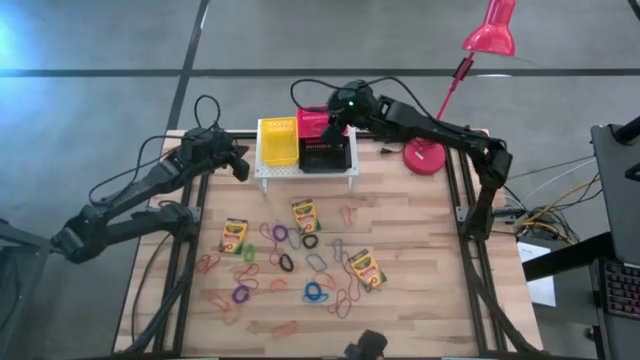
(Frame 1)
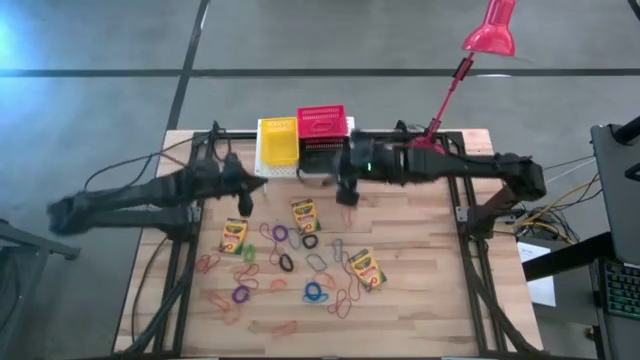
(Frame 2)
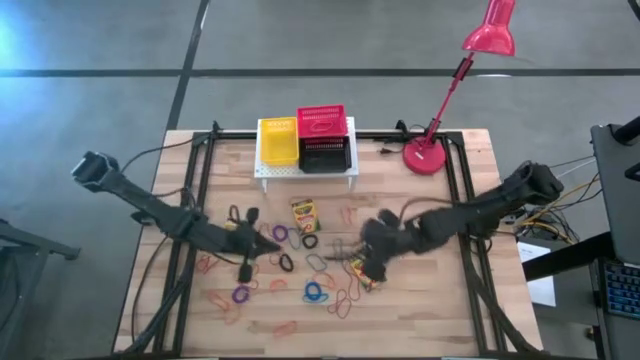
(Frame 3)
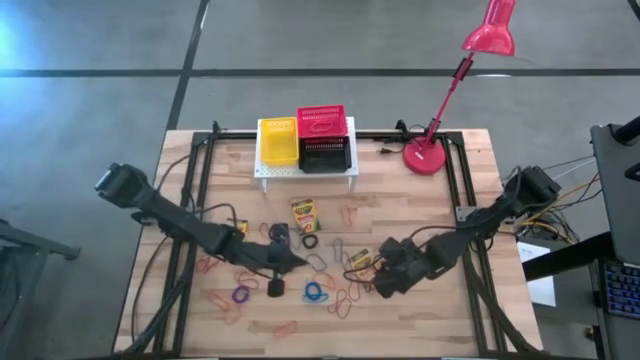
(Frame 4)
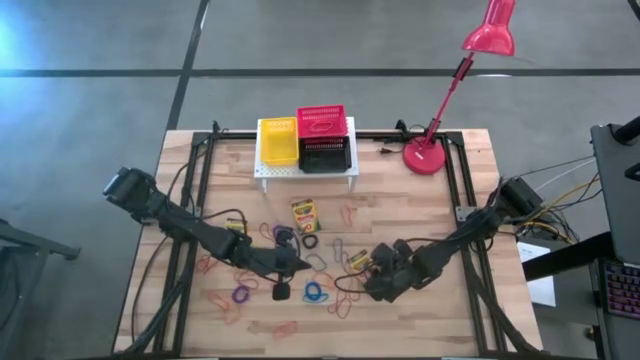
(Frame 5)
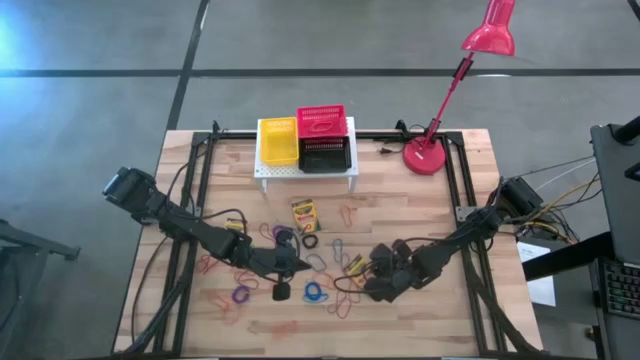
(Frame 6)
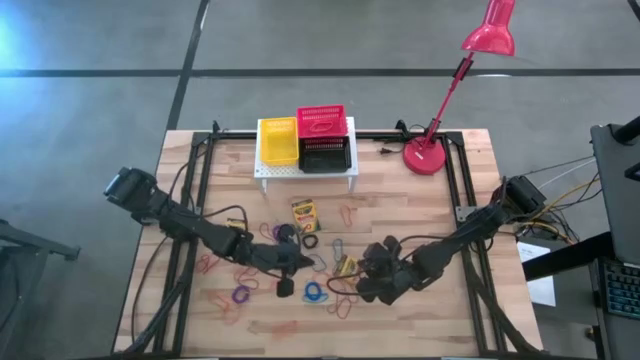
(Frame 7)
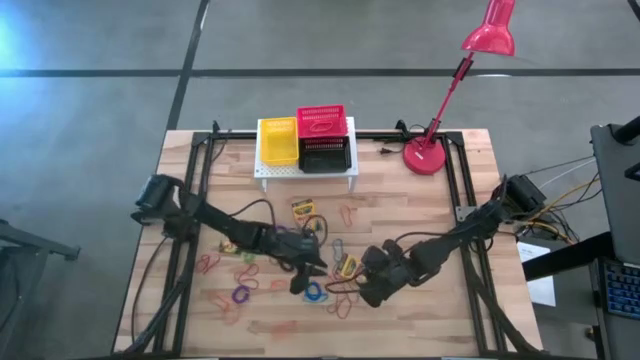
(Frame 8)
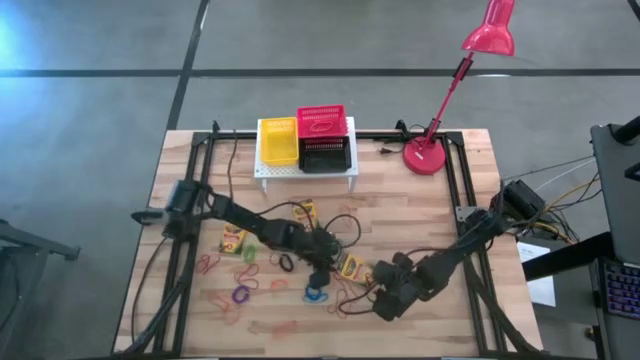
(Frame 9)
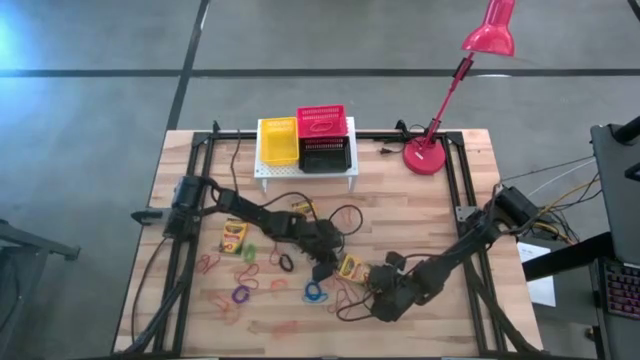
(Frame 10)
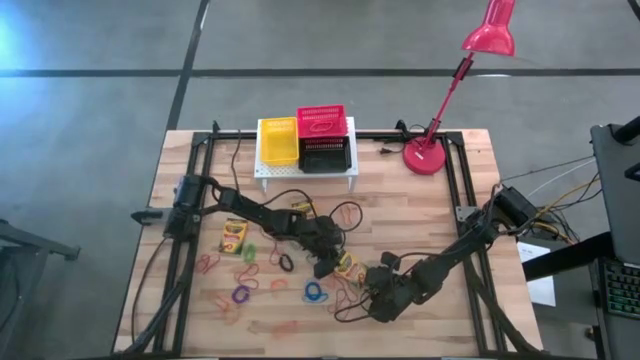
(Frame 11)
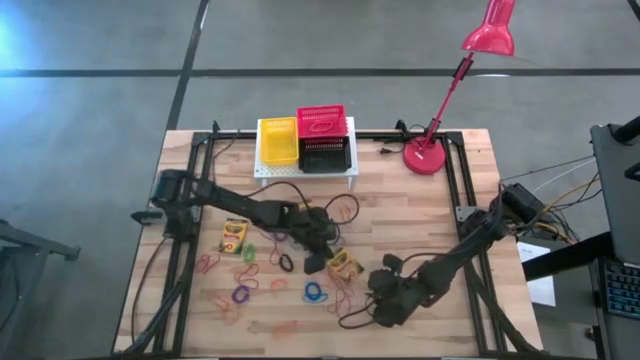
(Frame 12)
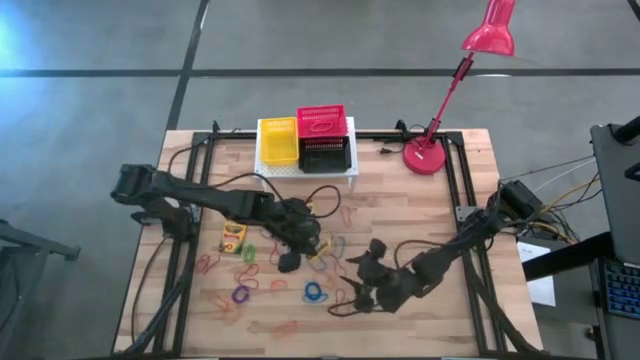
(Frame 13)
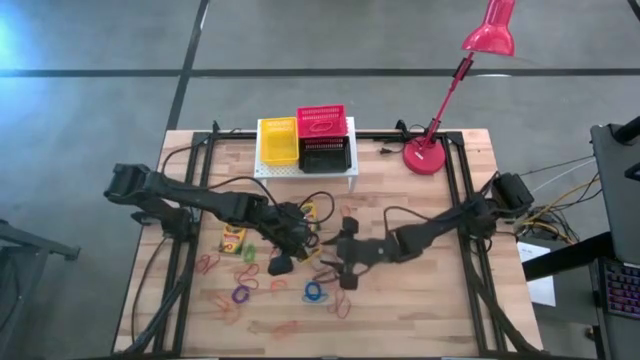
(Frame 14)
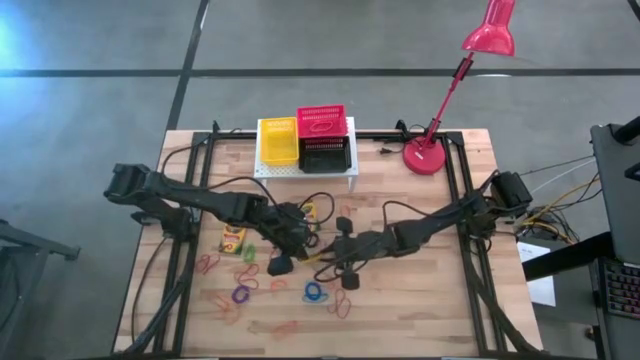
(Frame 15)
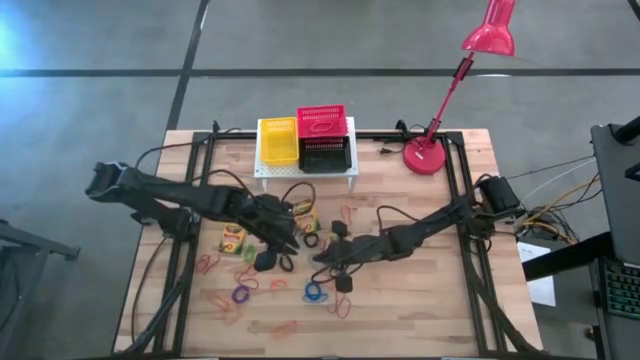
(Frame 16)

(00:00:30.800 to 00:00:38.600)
Task: Pick & Place Office Desk Supplies
Put the crayon box into the black bin

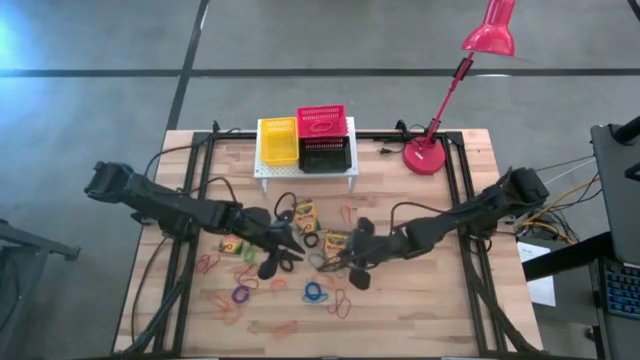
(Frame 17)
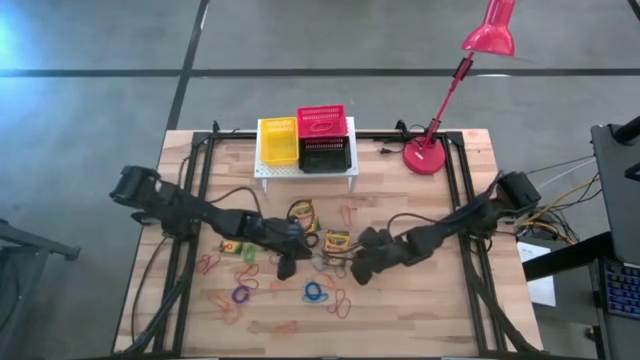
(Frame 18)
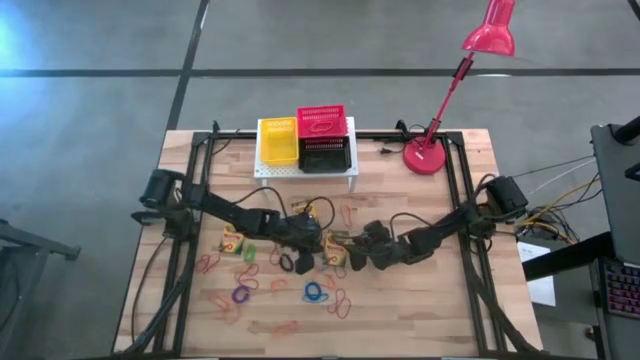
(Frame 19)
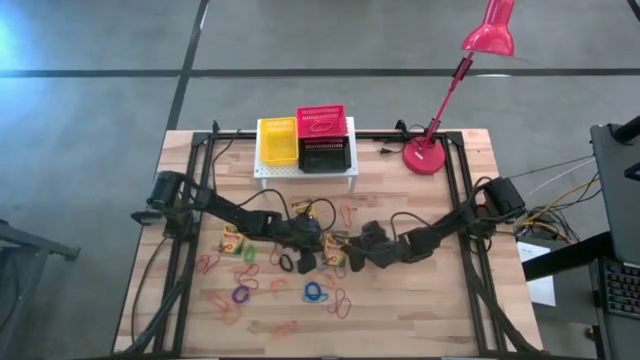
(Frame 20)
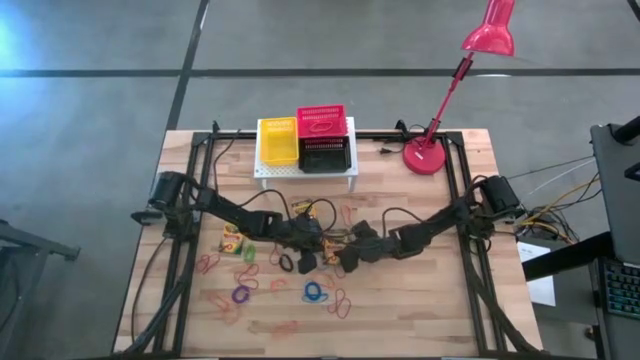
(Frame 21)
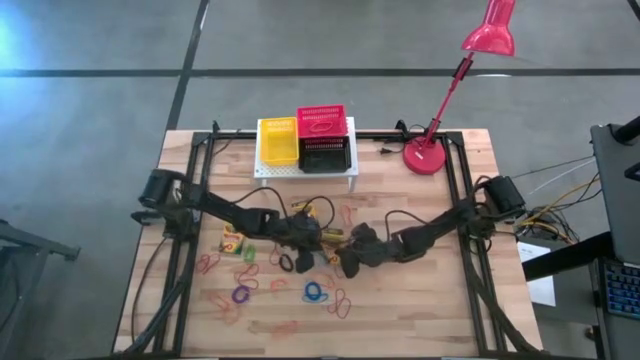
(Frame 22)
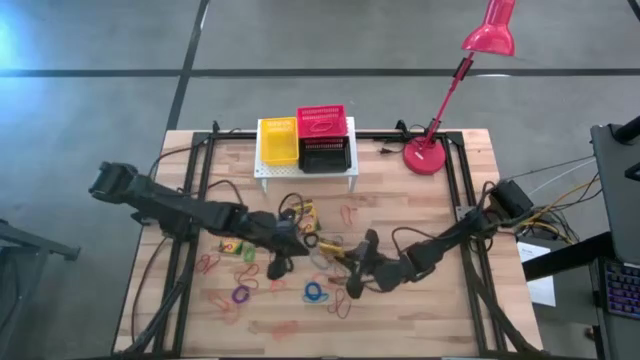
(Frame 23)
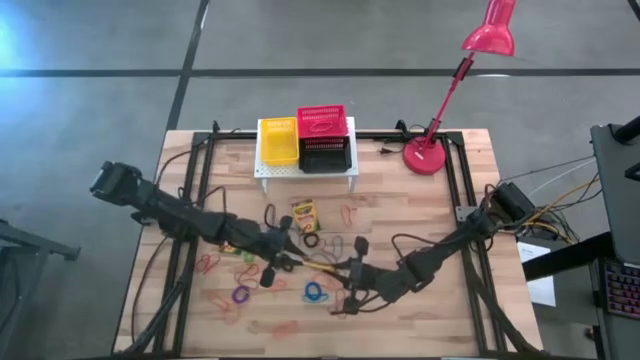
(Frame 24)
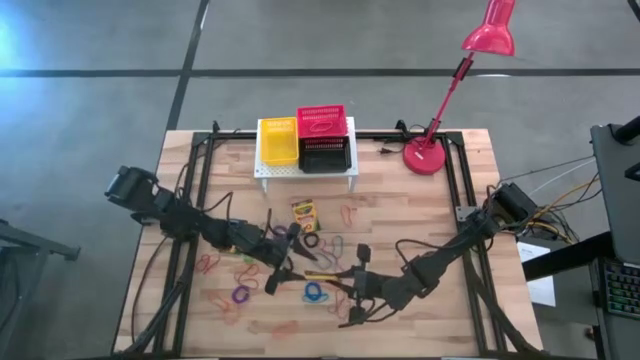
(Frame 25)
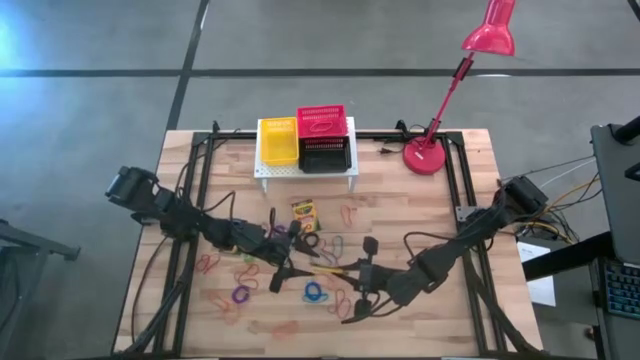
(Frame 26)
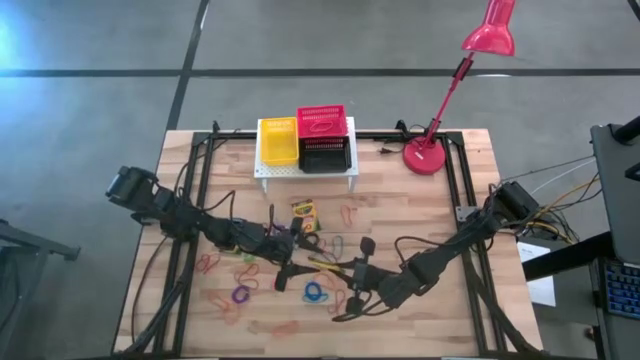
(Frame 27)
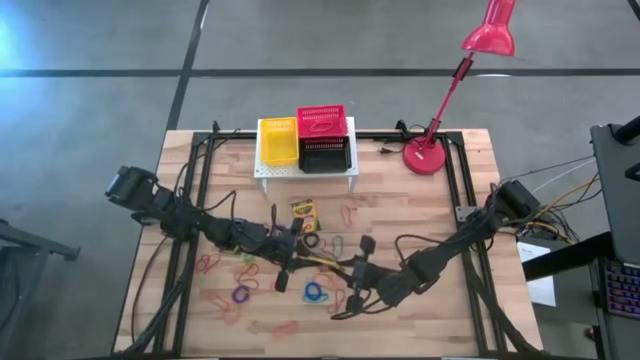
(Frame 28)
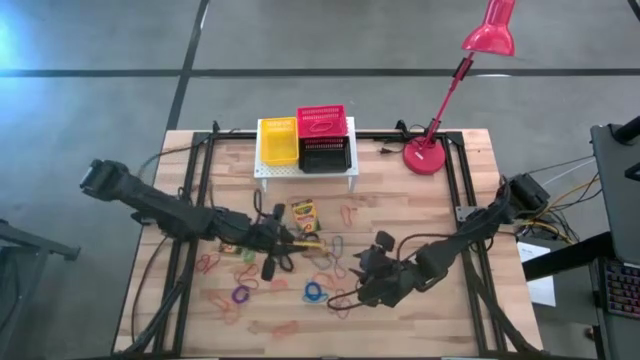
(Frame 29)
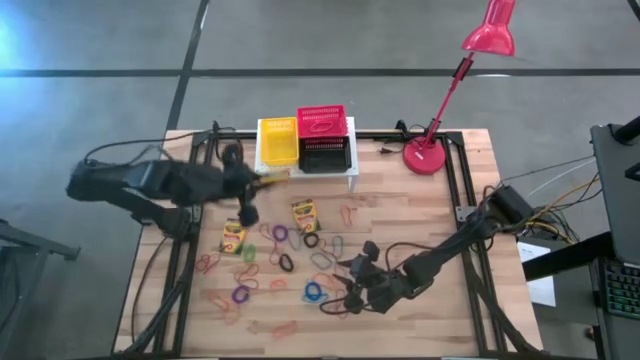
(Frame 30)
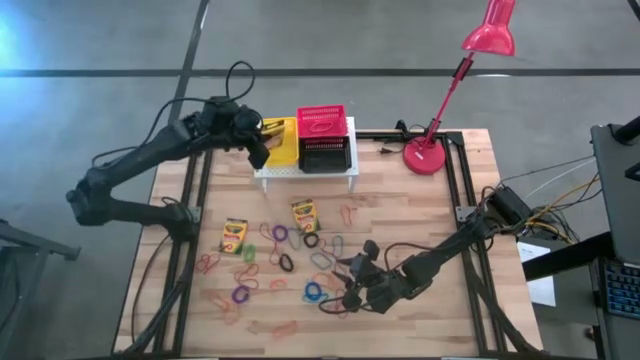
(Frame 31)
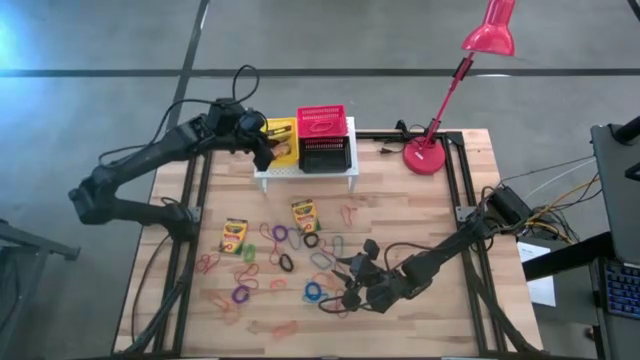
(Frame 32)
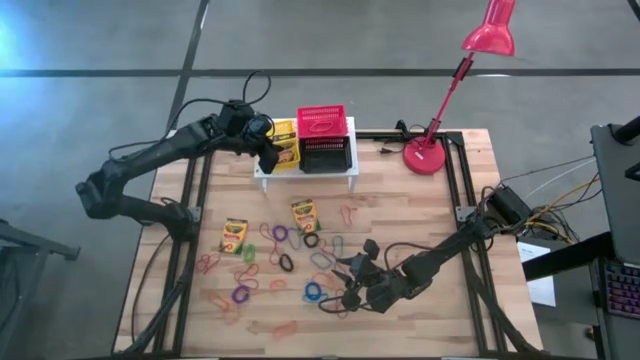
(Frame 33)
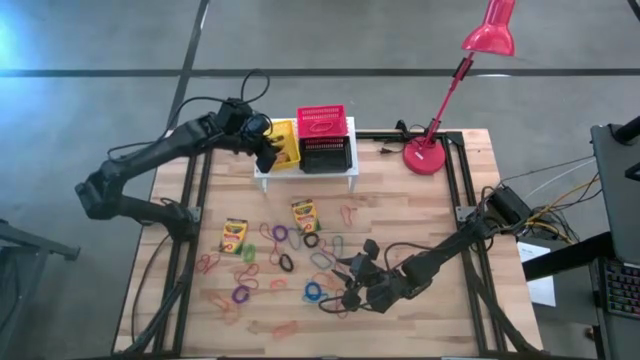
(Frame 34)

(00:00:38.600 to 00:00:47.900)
Put the crayon box into the yellow bin

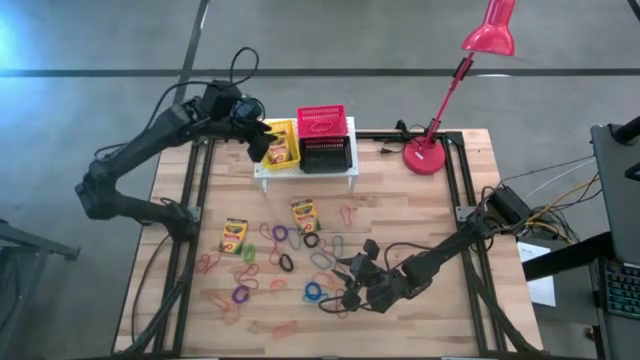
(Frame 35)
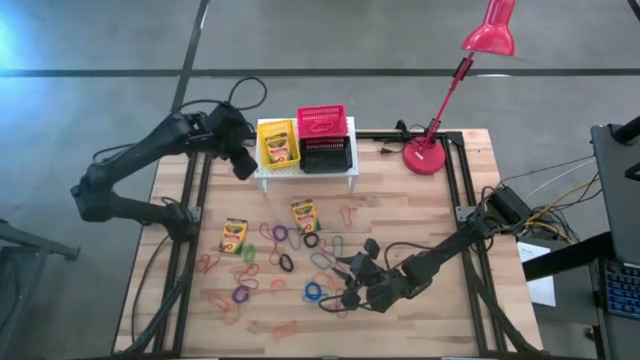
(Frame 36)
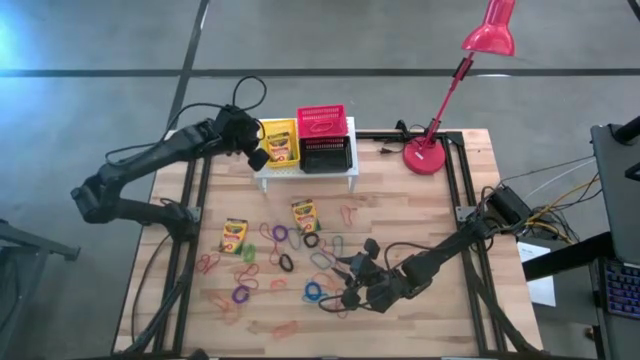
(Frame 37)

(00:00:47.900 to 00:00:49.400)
Adjust the yellow bin

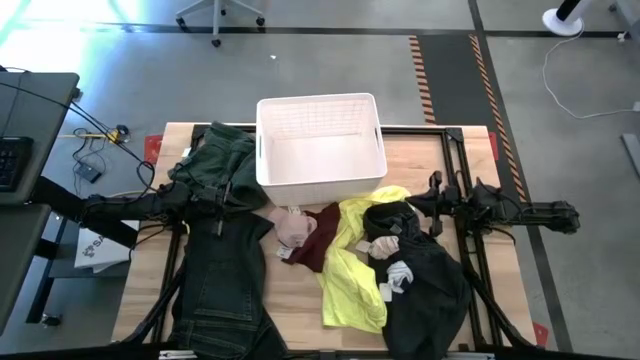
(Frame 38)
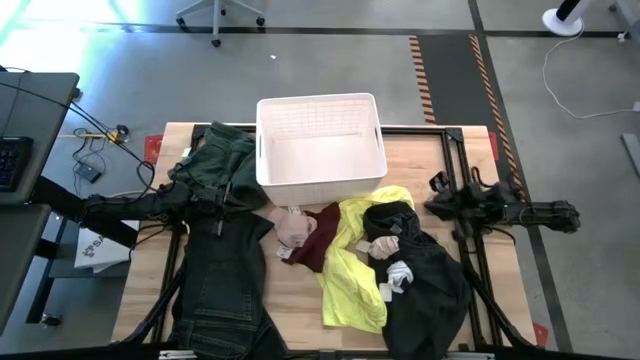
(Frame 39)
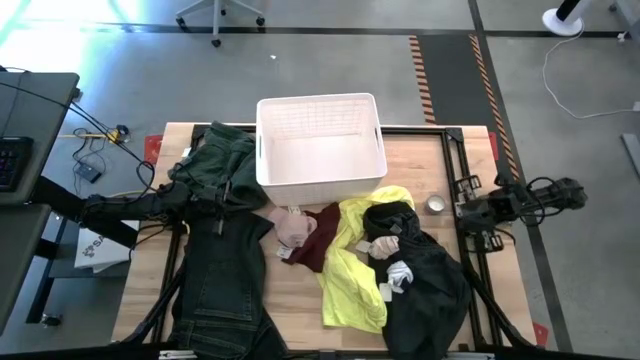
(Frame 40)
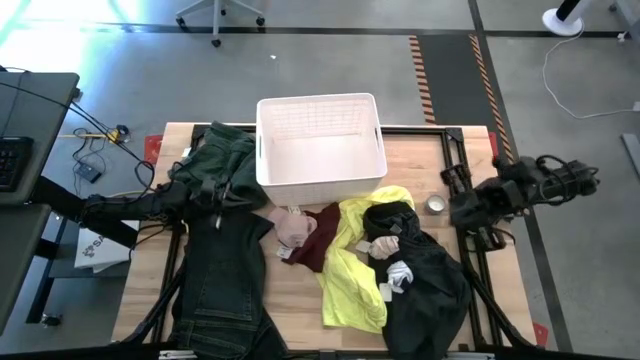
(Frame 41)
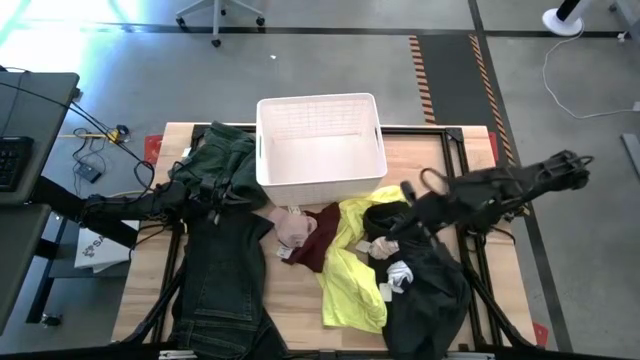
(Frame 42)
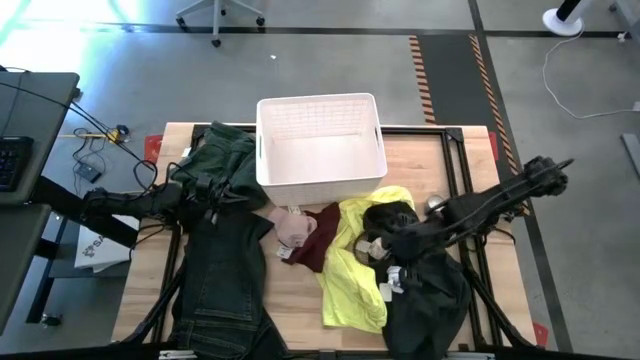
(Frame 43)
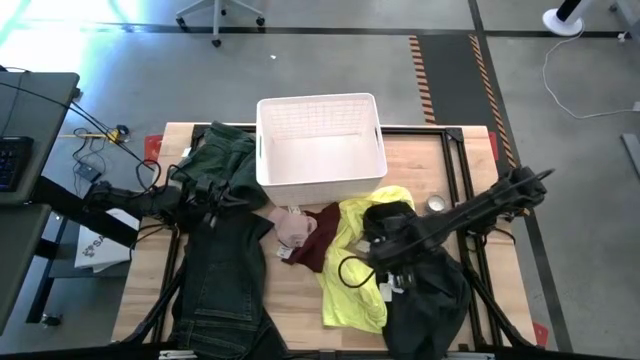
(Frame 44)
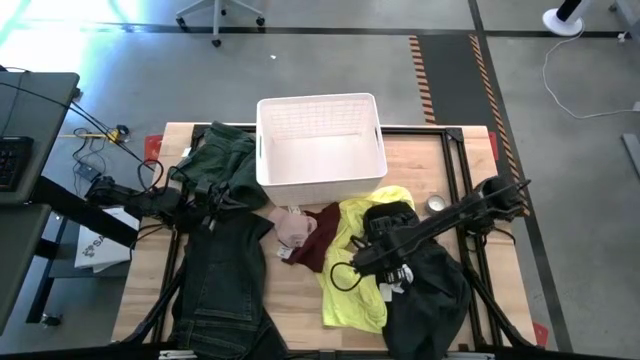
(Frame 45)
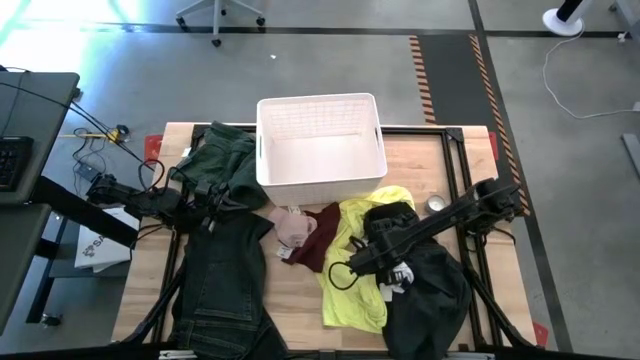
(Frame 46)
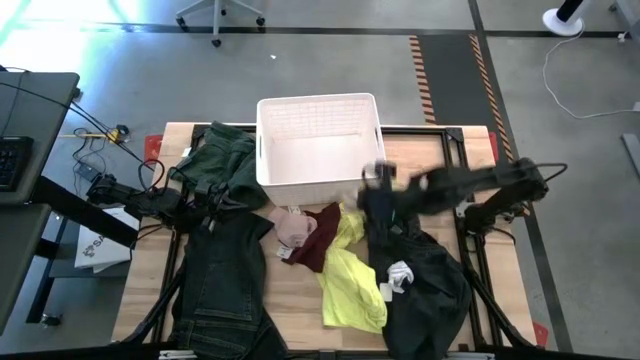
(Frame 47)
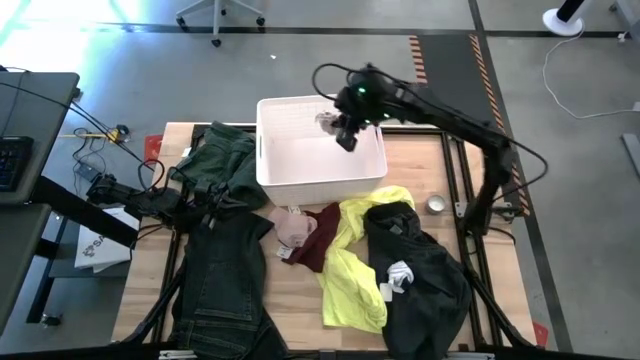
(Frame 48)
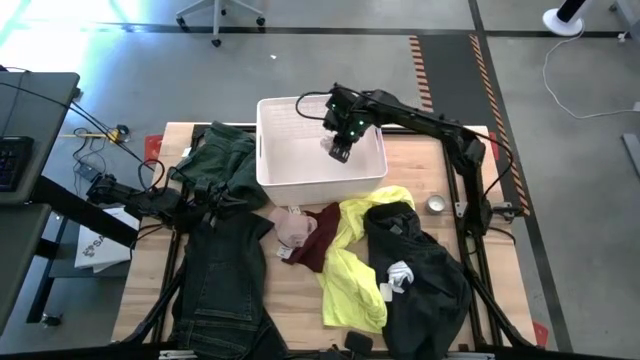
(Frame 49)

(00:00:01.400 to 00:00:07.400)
Task: Sort clothes
Put the brown striped sock into the white laundry bin
